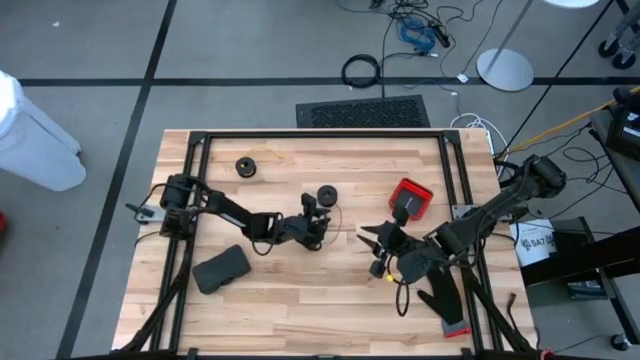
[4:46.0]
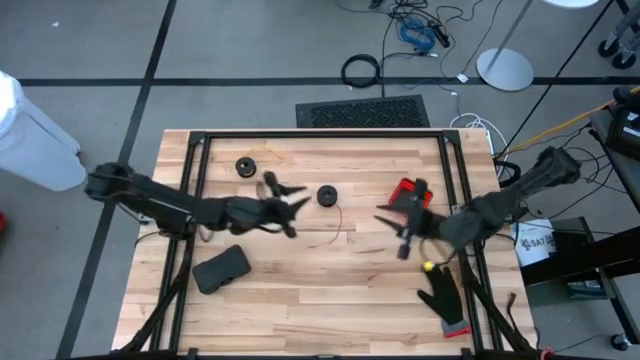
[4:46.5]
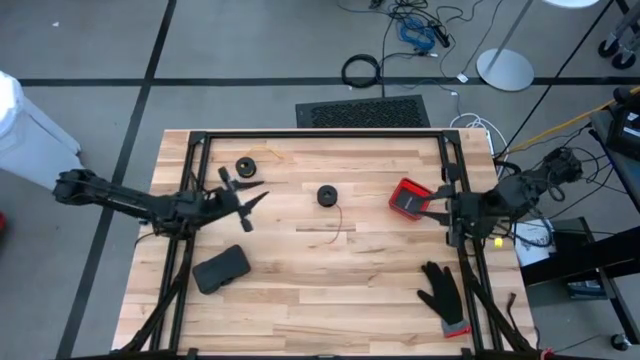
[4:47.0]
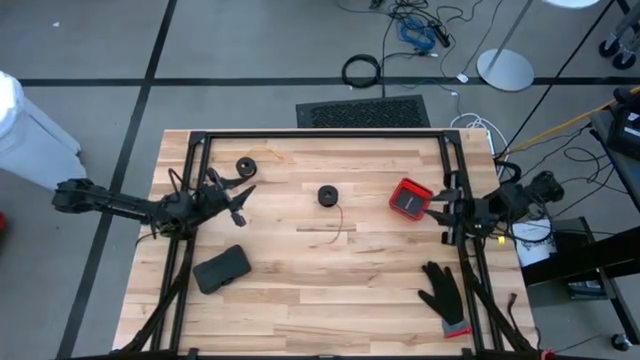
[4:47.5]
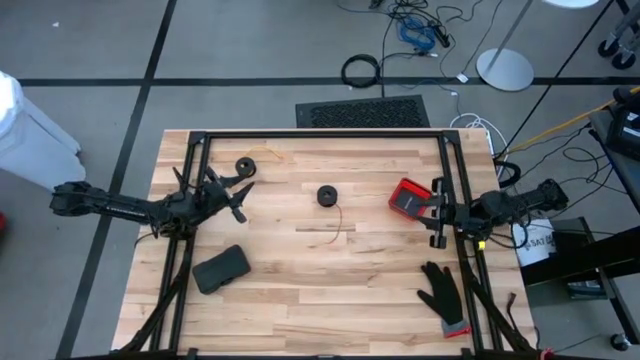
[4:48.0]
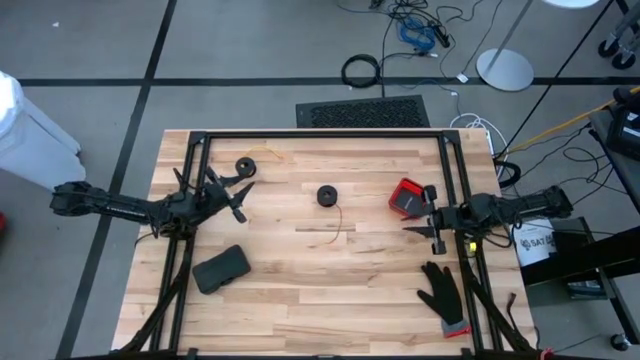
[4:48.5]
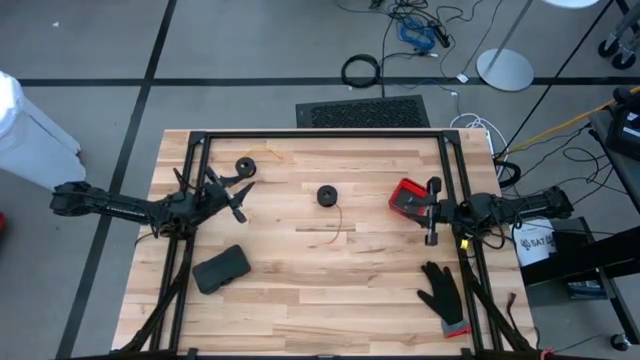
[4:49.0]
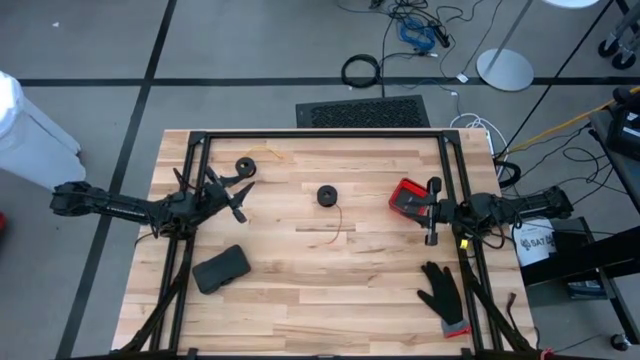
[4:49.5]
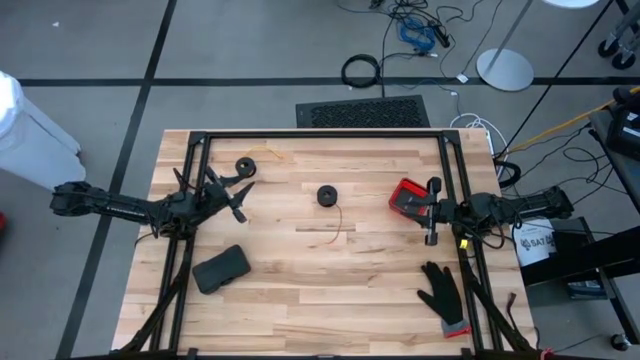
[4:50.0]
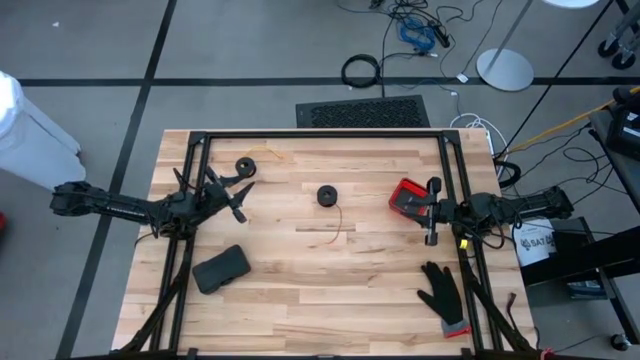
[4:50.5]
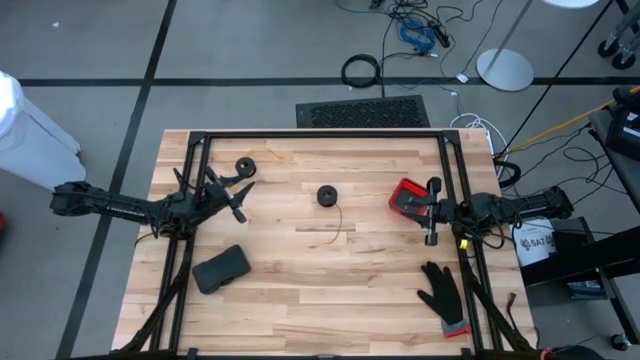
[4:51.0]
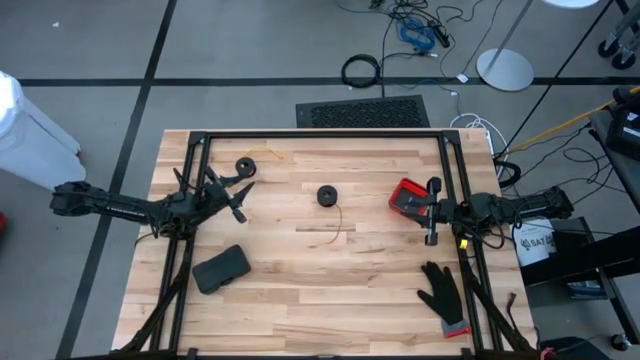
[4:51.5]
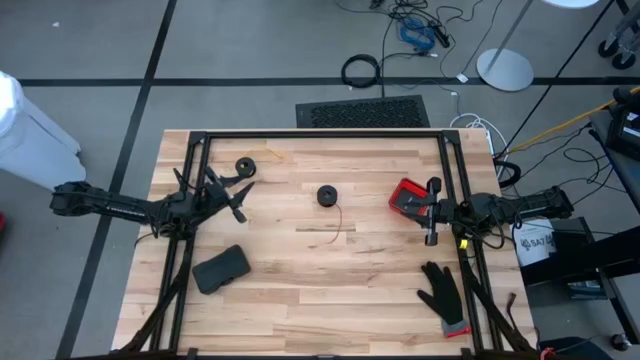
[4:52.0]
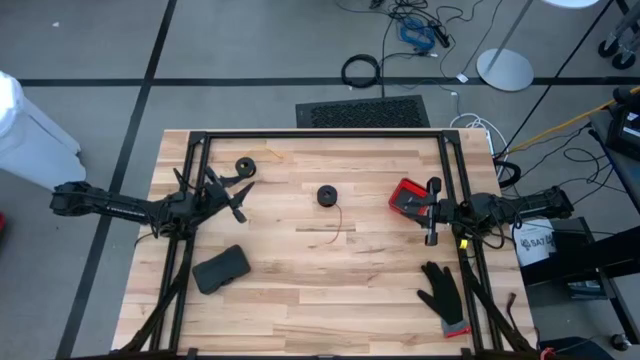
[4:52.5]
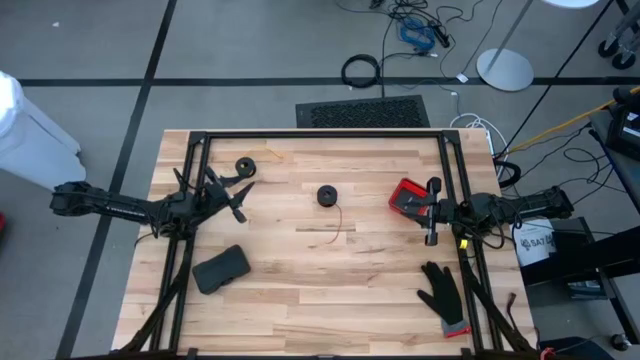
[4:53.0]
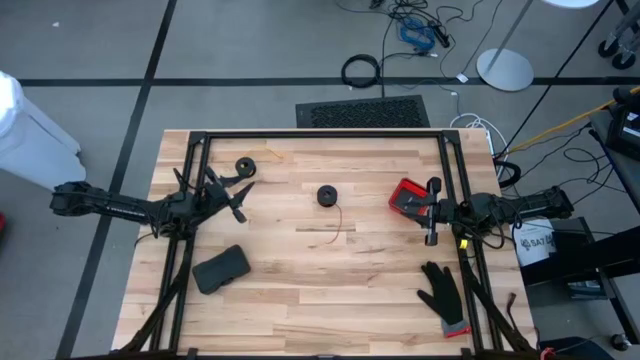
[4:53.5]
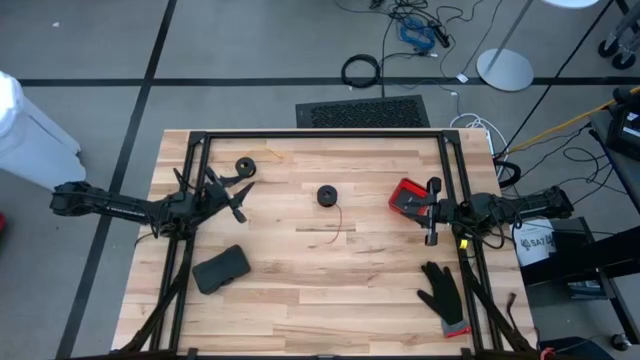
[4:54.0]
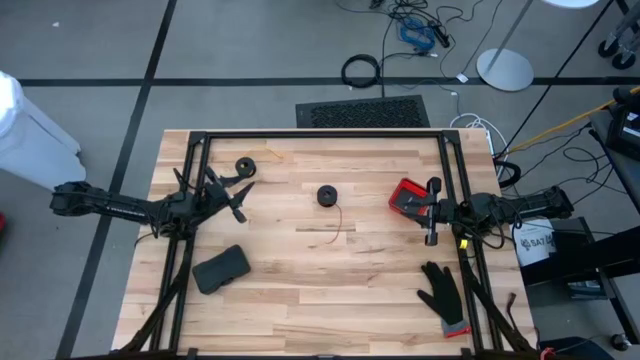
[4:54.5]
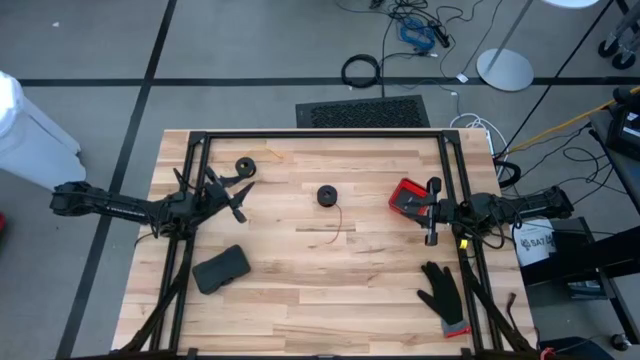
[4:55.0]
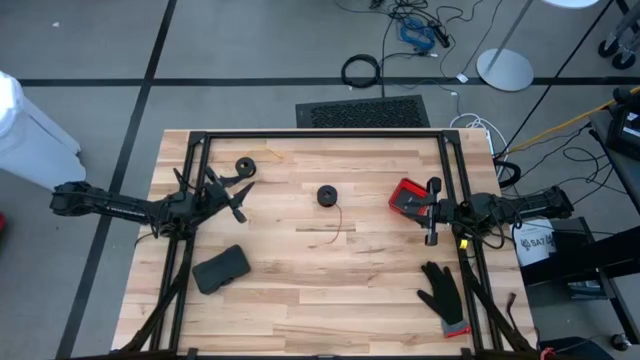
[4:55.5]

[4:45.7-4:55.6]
Task: Coil cords
Return to Home Position

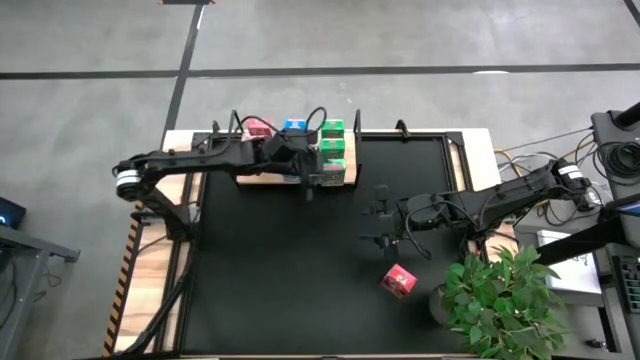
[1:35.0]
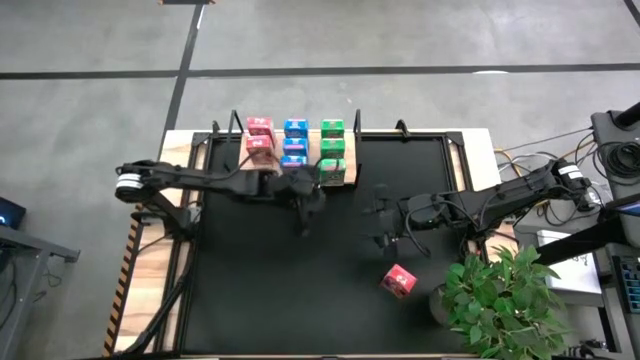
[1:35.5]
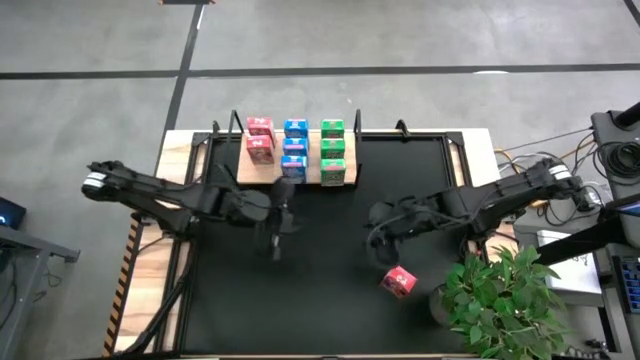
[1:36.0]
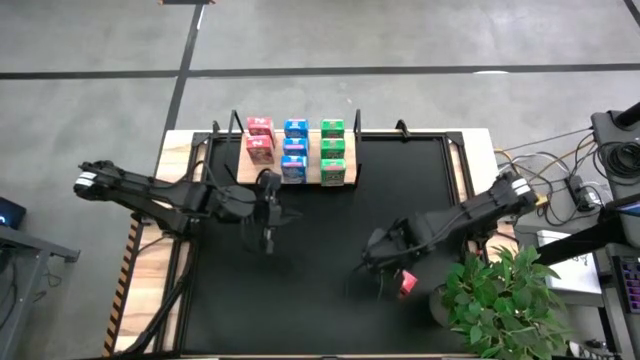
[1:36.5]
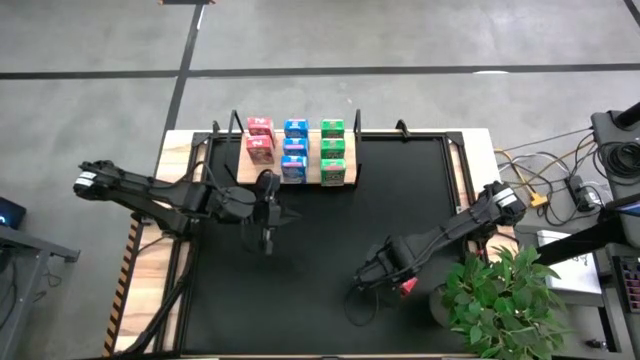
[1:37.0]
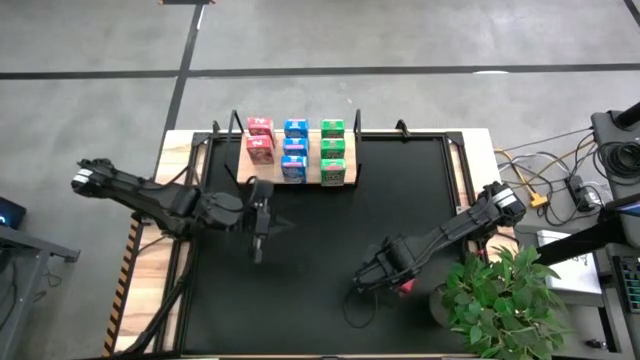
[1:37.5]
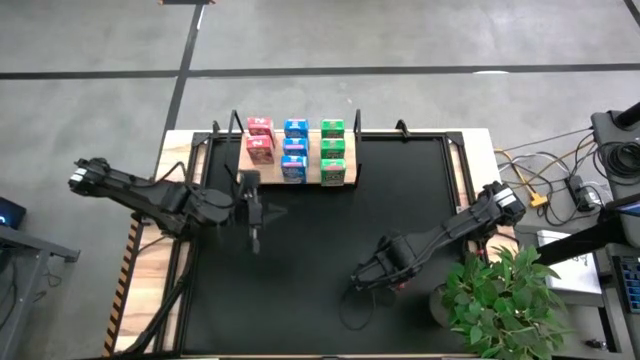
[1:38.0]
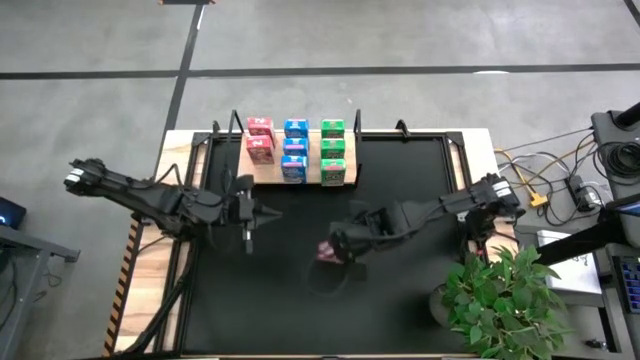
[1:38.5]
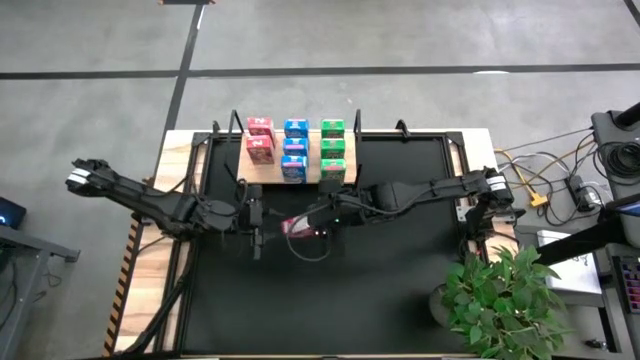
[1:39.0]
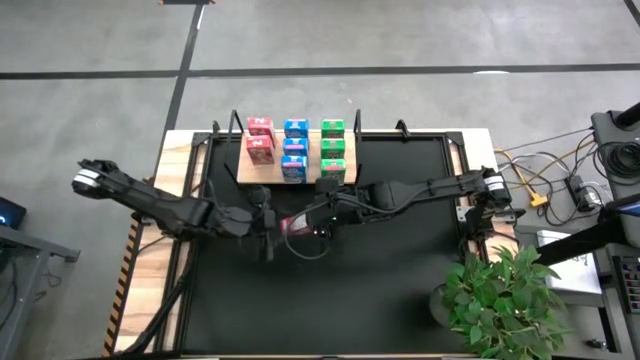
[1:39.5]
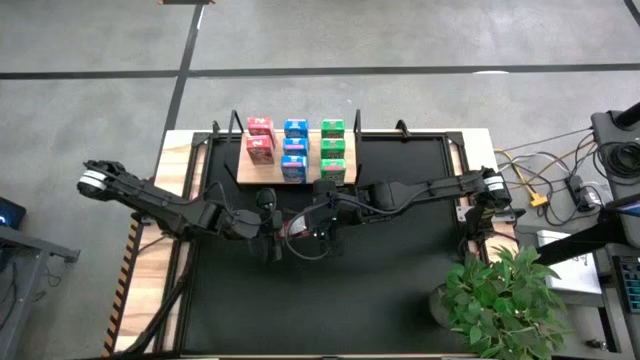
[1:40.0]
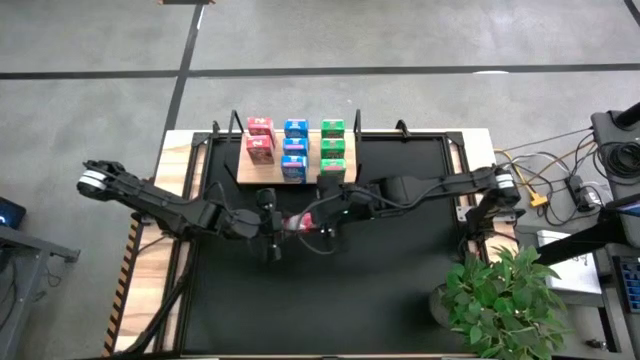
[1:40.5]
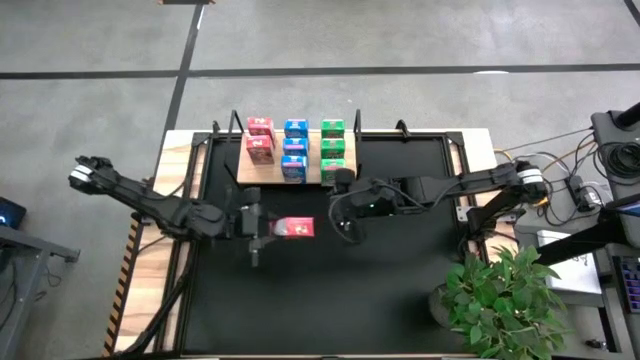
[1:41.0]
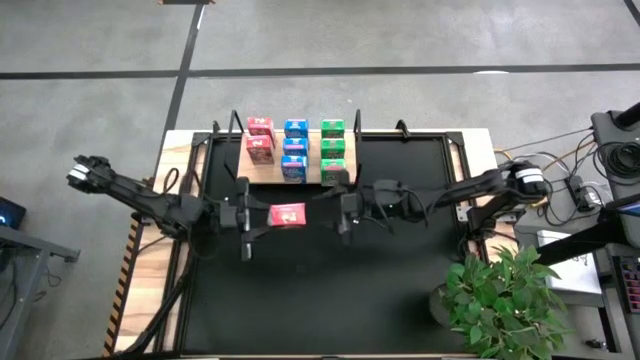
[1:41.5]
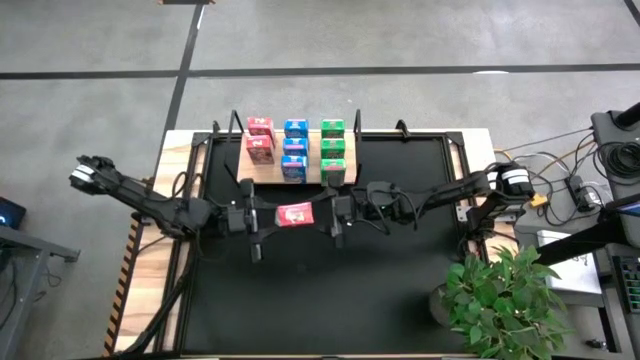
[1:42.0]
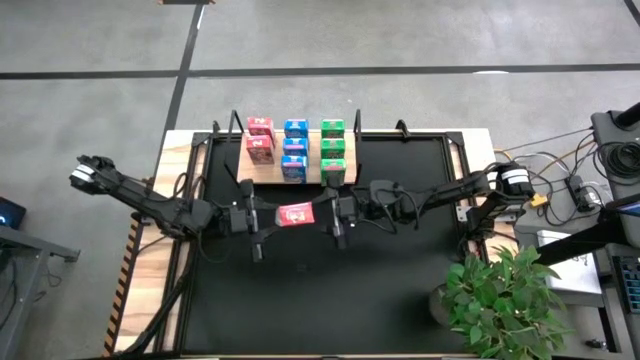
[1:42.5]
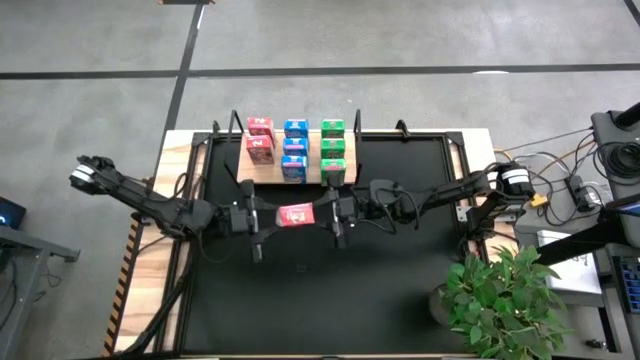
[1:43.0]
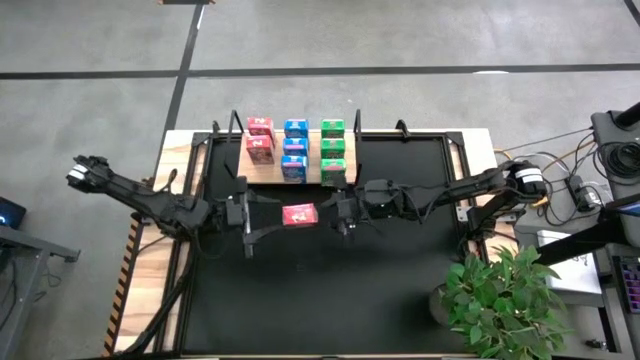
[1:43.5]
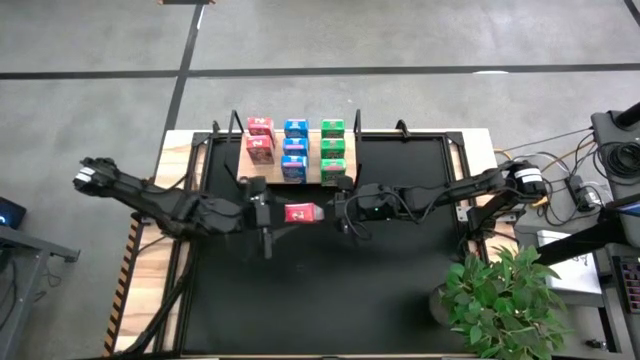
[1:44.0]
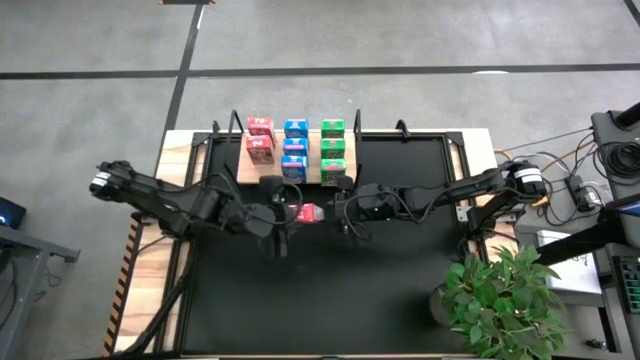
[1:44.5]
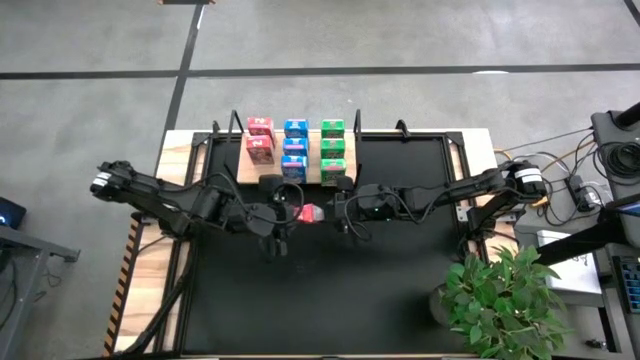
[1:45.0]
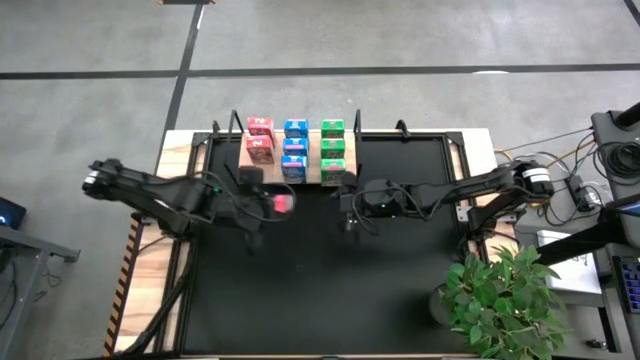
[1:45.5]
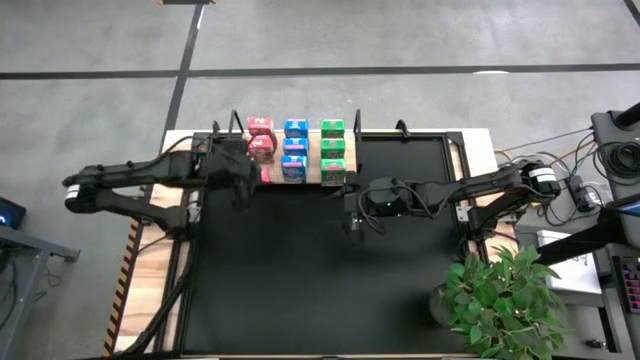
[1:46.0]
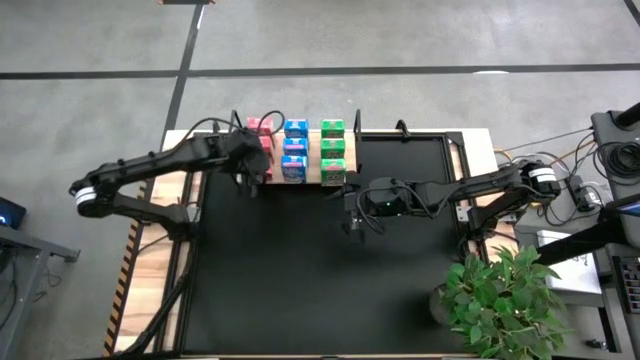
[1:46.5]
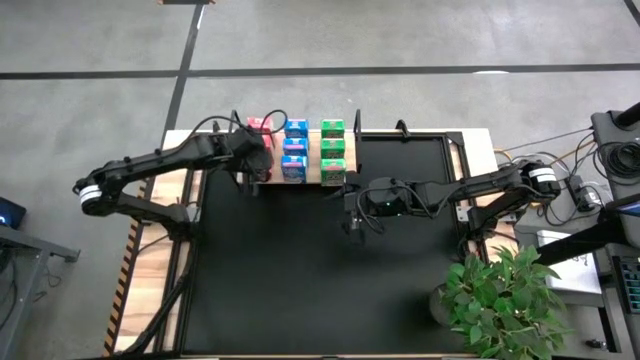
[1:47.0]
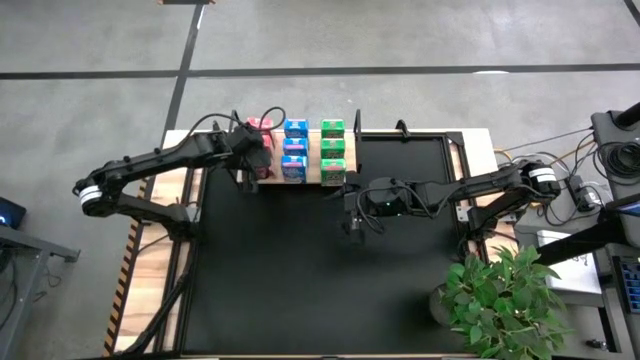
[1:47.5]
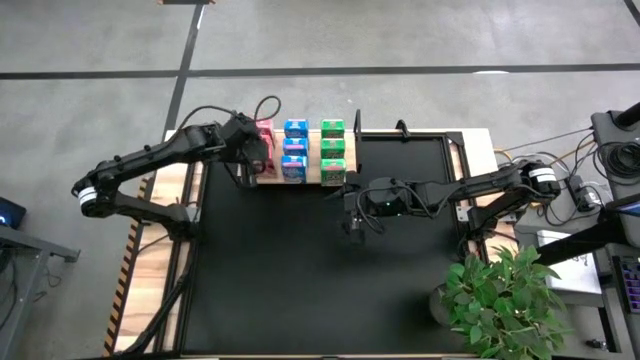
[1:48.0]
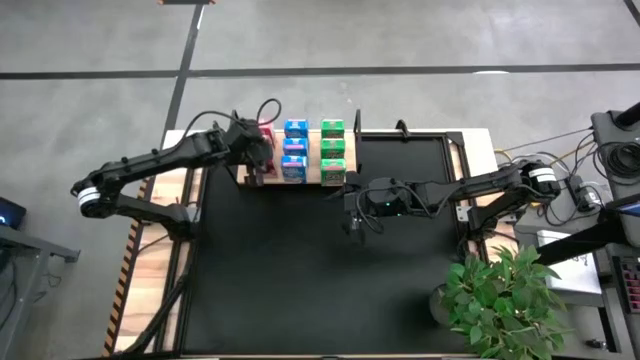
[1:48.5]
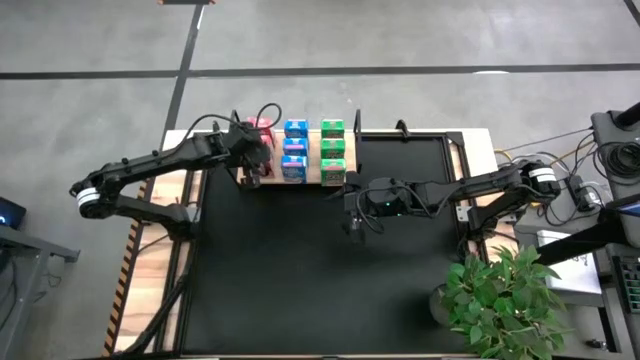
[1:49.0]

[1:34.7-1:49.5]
Task: Stack cereal on shelf
Put the red cereal box on the shelf aligned with the other red cereal boxes
